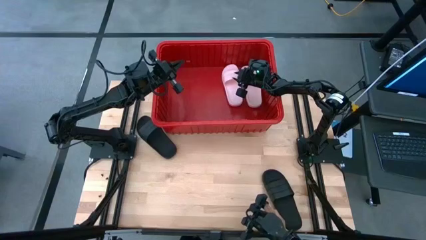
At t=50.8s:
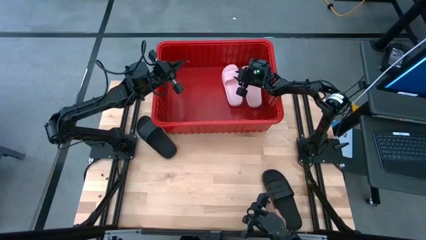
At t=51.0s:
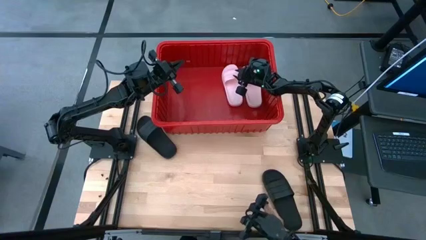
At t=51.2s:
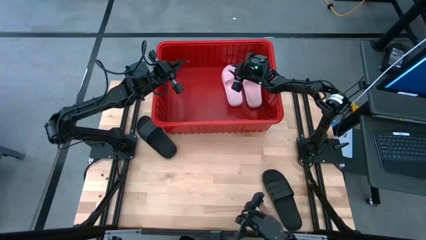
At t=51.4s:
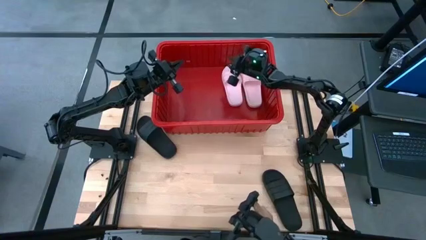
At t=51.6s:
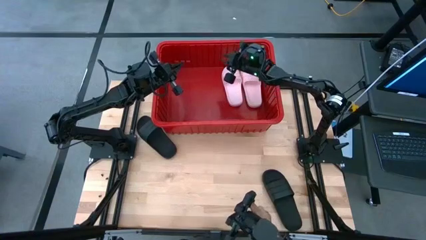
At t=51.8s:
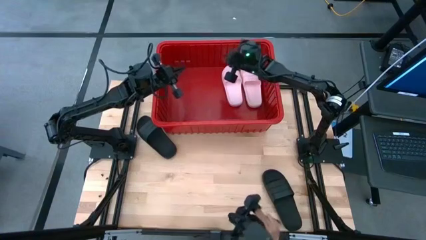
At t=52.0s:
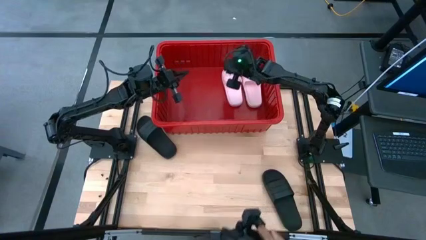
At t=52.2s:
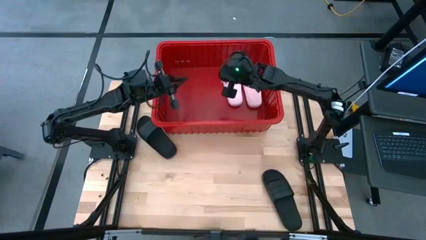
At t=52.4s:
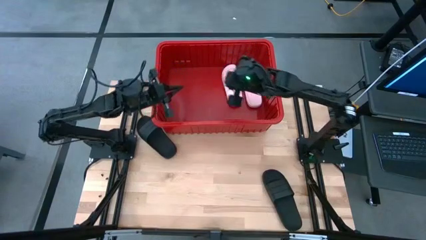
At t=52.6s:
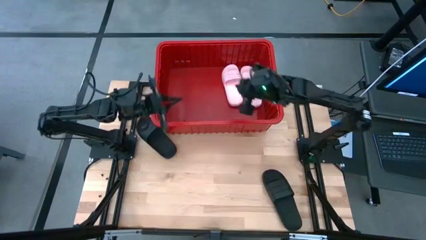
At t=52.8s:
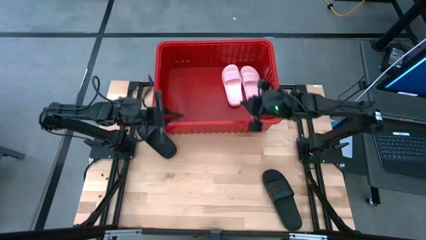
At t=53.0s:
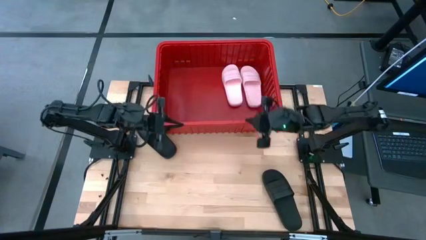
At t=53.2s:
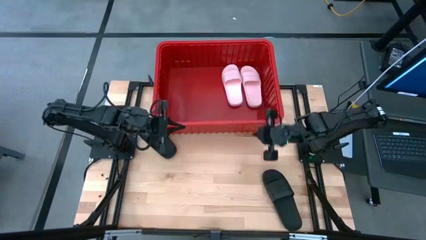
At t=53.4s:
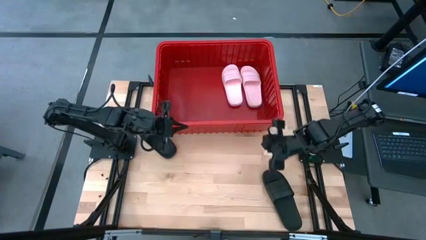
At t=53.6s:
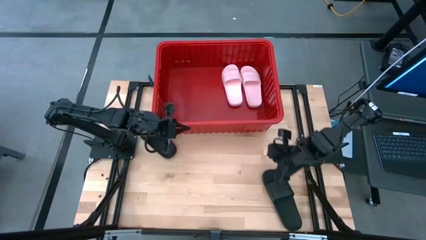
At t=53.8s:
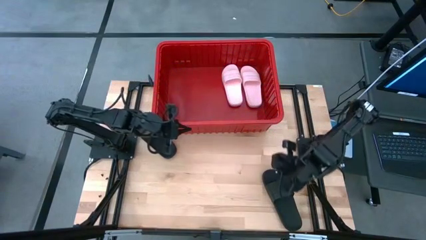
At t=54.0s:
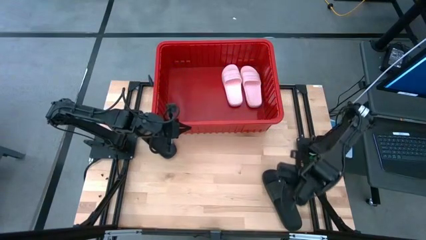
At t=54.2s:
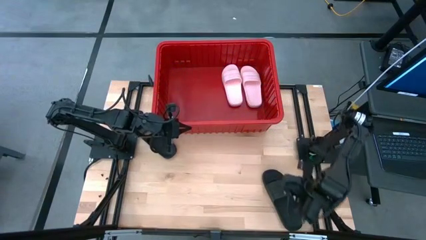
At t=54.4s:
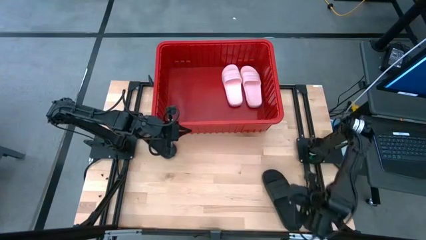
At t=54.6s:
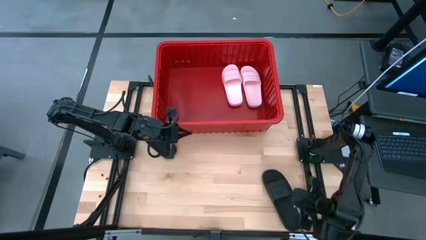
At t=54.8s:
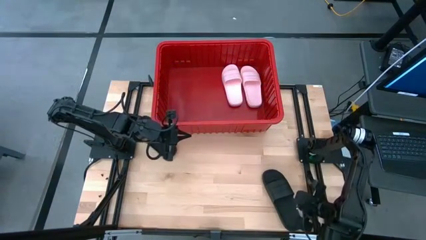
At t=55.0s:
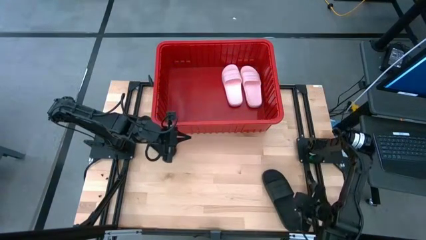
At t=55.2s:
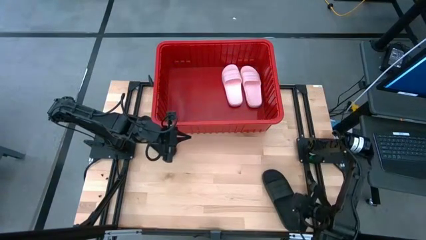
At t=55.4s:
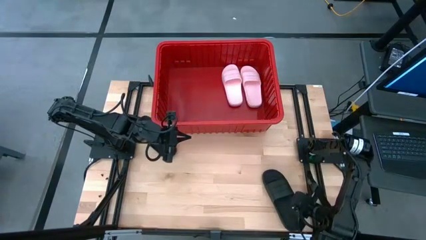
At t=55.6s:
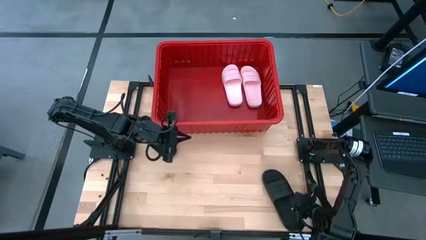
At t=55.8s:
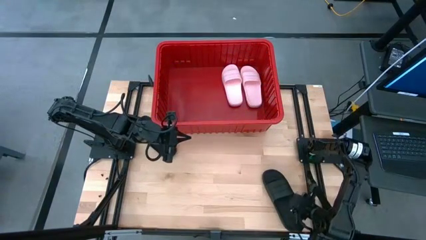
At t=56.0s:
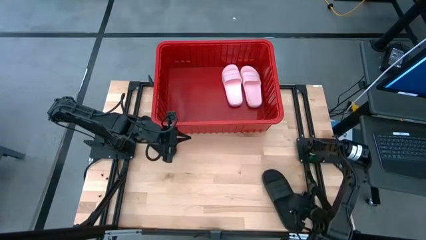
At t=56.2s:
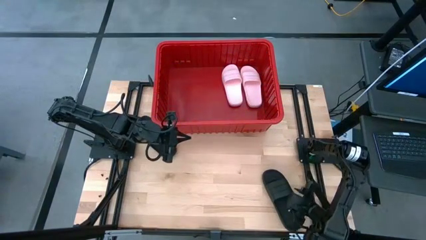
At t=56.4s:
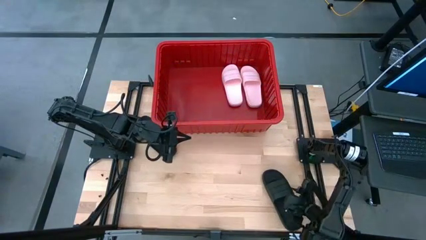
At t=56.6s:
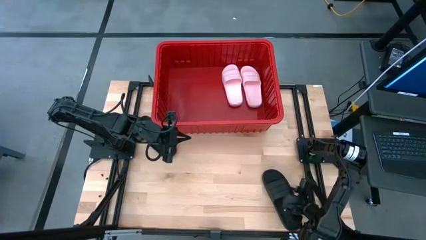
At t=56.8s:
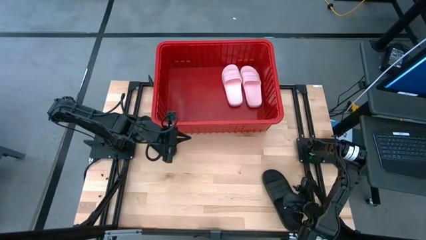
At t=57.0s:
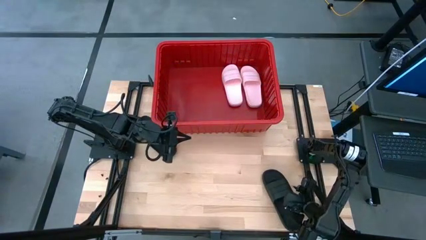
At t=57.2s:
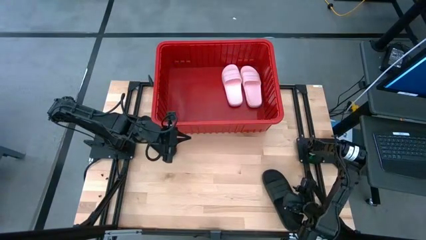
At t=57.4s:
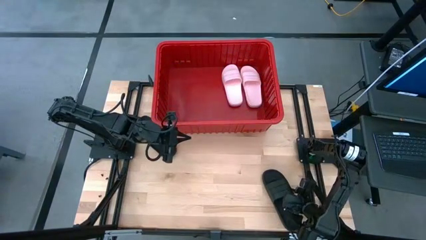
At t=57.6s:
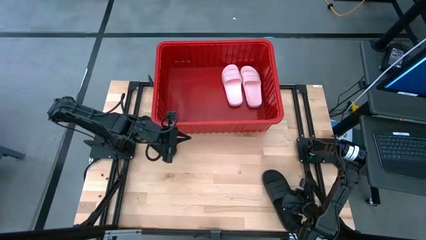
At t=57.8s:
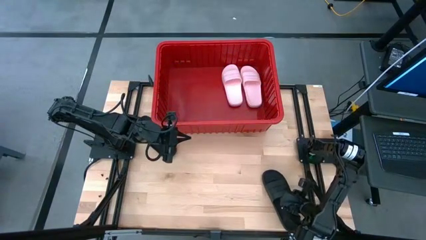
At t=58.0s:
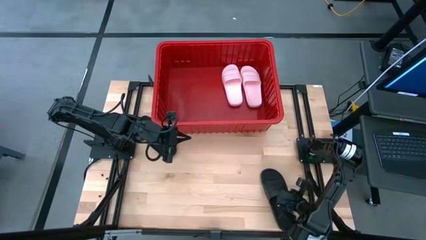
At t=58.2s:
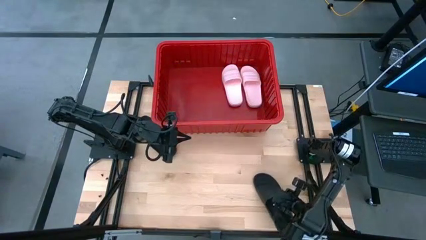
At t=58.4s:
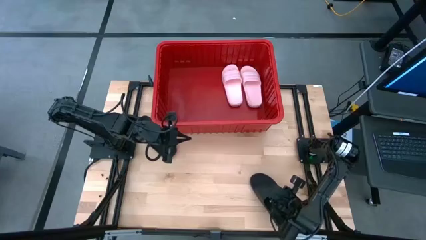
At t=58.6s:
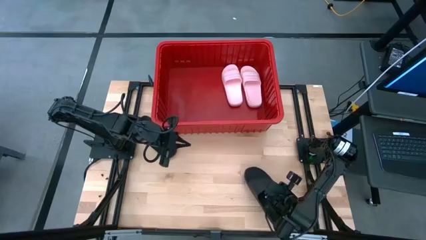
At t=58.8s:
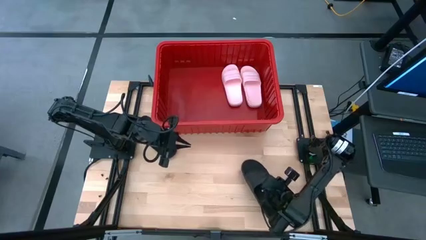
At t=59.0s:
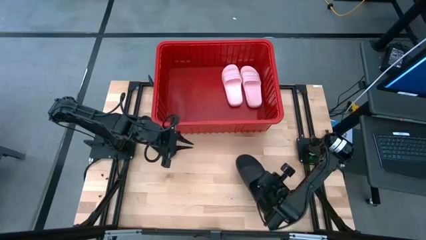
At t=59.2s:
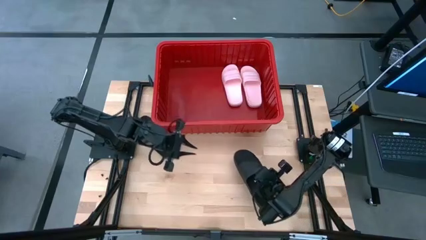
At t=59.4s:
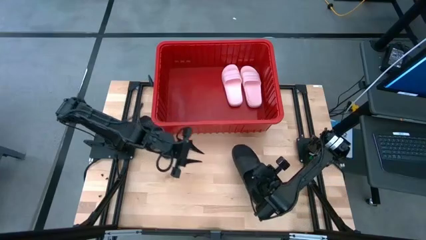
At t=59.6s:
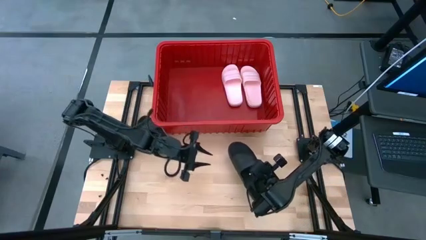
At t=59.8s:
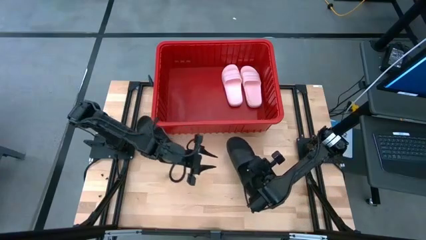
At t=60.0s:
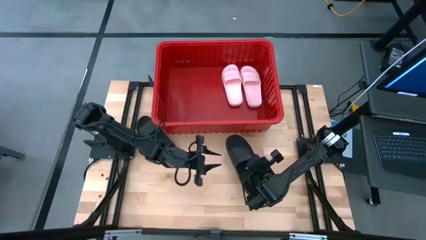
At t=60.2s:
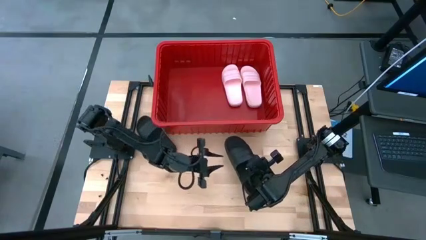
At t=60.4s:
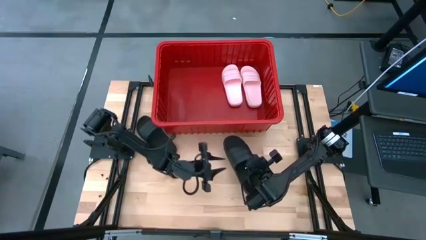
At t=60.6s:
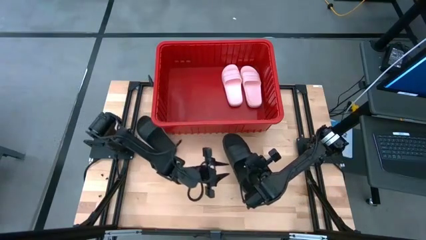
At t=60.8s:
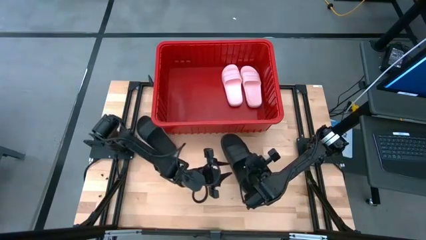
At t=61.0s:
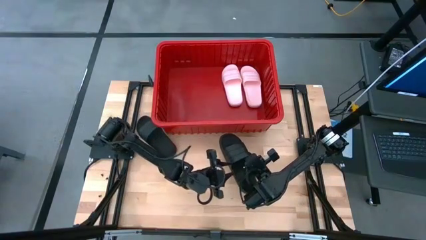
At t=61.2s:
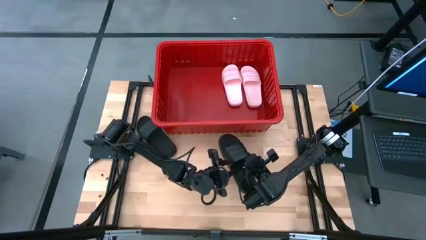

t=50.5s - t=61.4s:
Task: Pick and place slides into bin
Put the bottom black slide into the red bin

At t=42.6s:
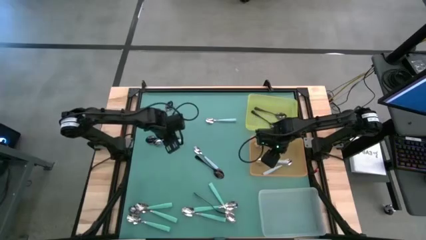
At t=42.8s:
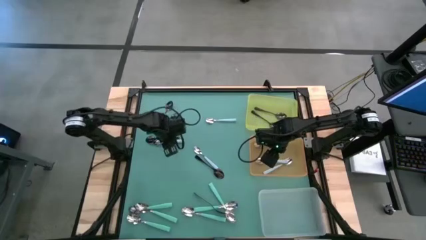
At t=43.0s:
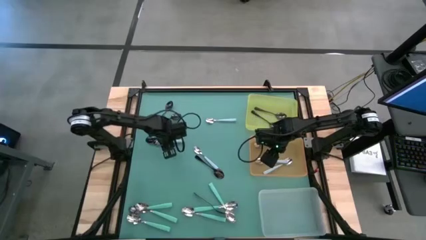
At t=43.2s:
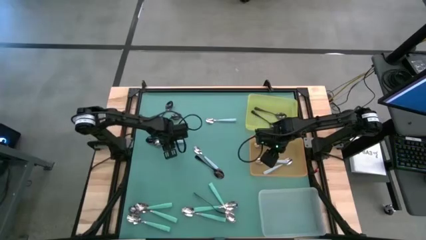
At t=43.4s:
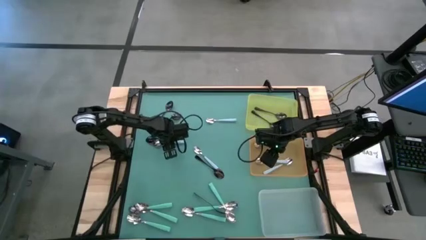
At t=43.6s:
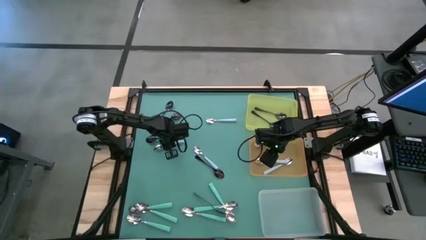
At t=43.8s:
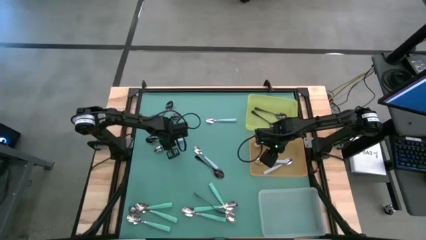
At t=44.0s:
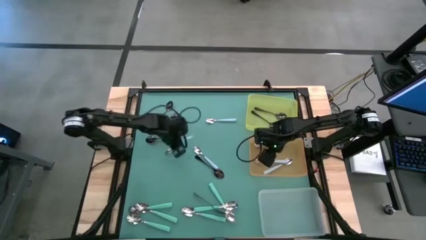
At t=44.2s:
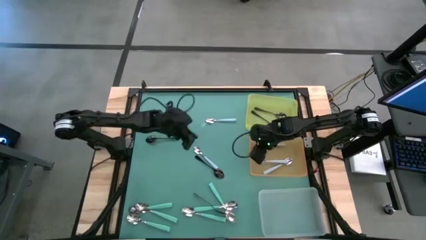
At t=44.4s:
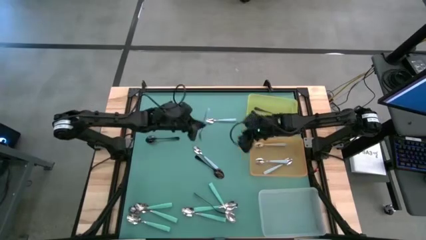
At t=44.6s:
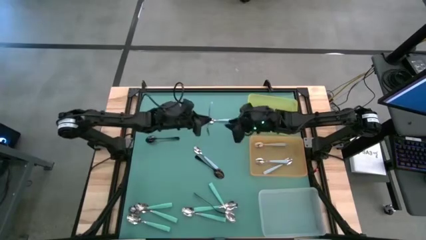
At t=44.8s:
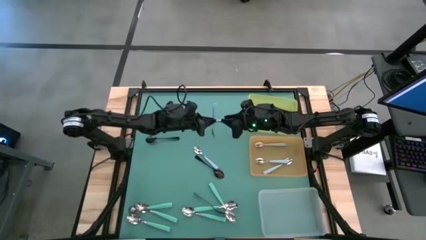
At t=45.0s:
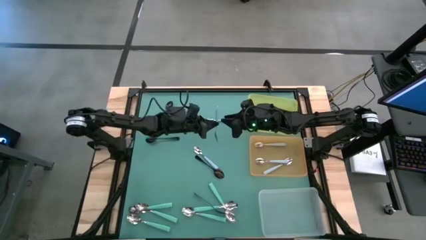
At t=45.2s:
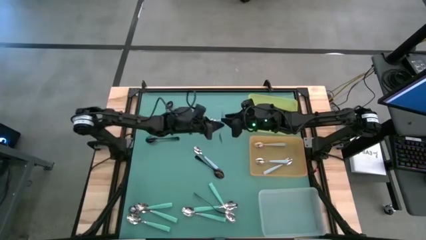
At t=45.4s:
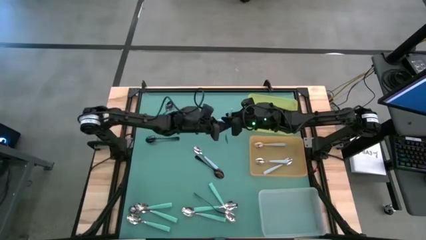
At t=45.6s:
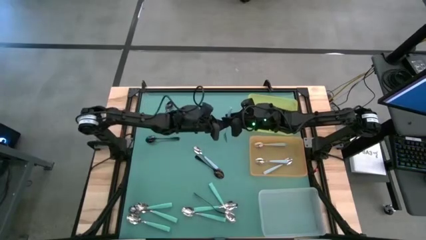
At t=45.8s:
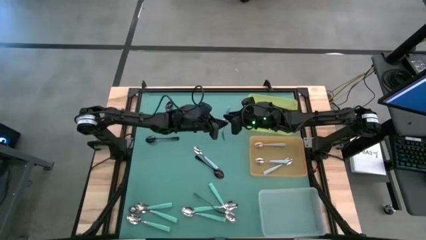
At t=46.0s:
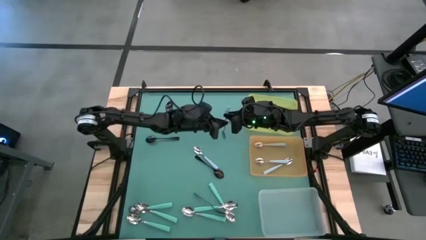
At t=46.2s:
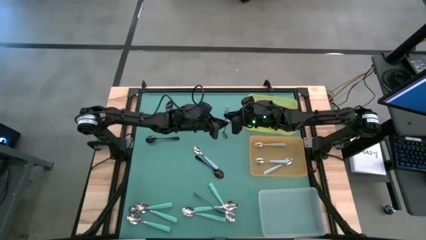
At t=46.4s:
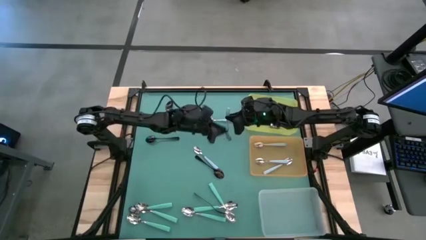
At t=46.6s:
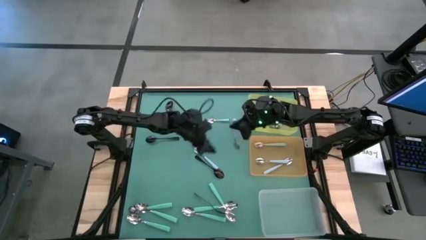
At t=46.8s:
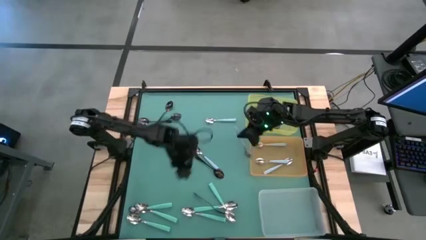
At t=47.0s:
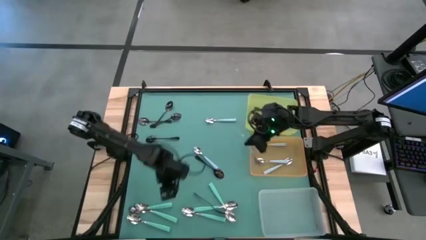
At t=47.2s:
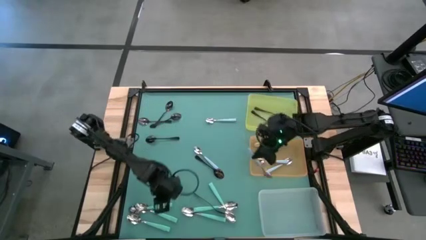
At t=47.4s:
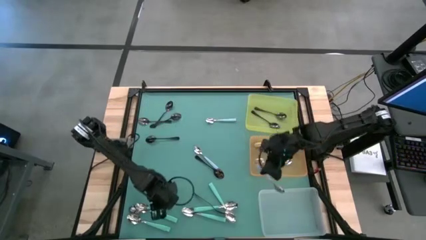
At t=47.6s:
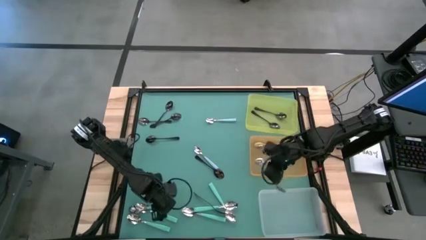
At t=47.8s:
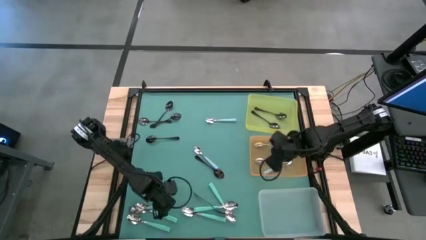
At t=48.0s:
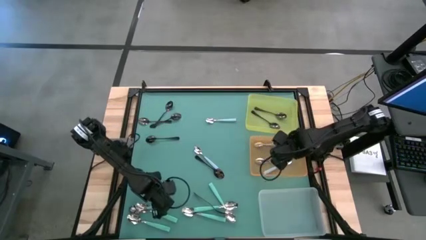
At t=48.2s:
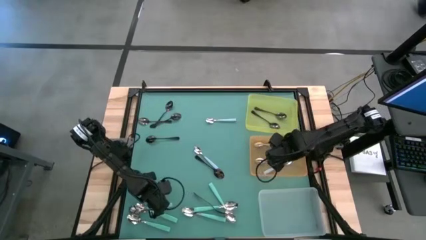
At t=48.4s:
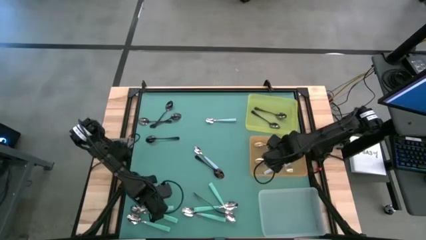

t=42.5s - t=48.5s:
Task: Sort silverware by color (type)
Put the blue spoon into the orange bin
